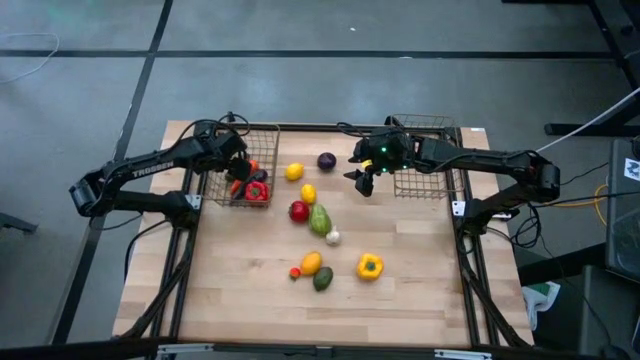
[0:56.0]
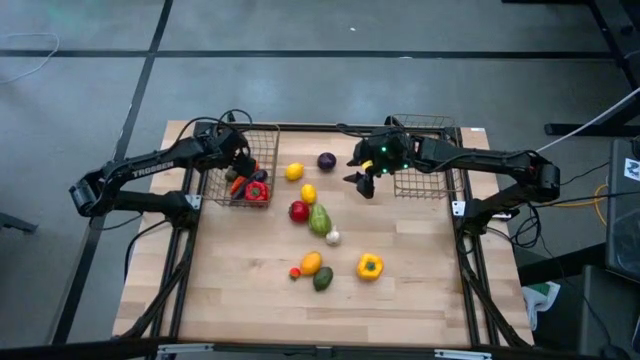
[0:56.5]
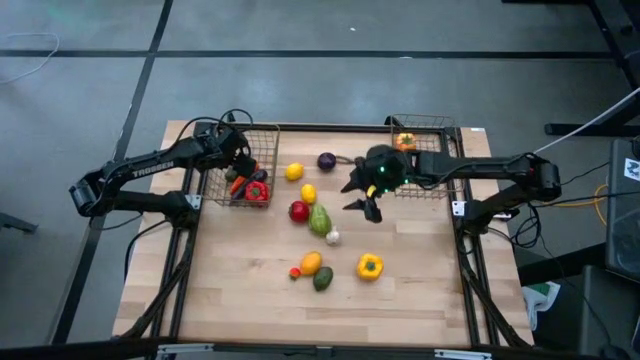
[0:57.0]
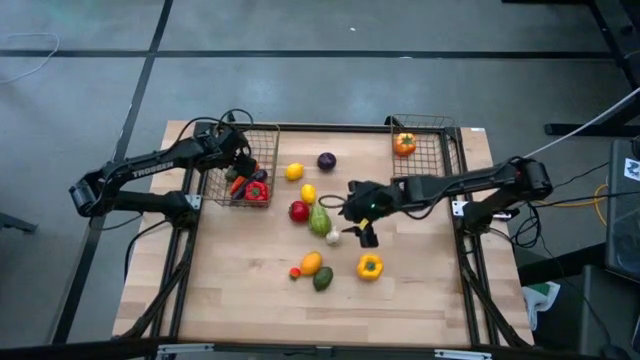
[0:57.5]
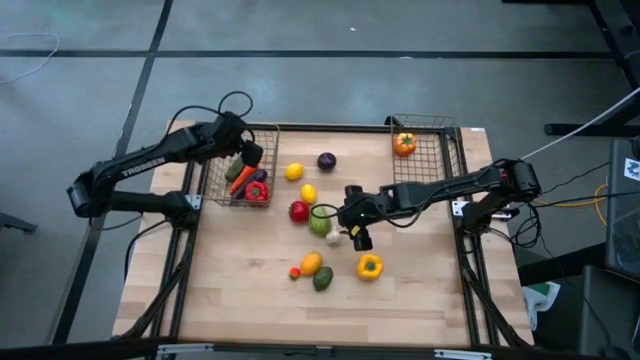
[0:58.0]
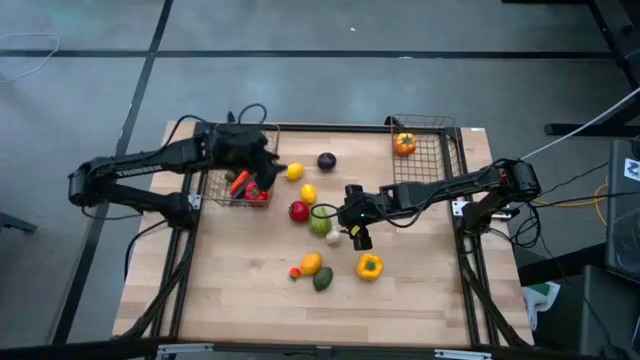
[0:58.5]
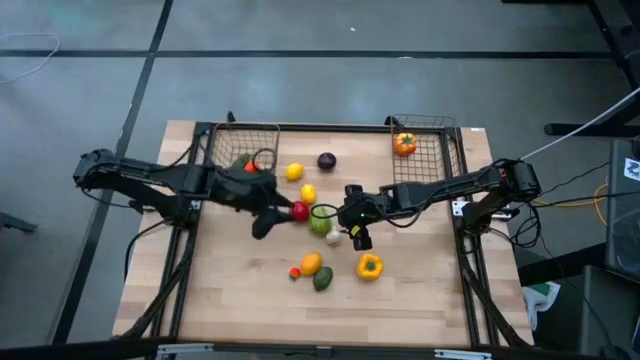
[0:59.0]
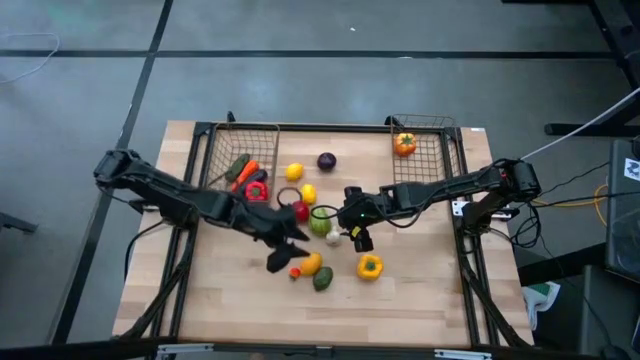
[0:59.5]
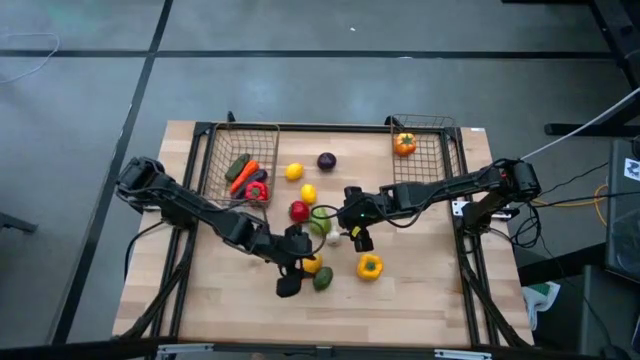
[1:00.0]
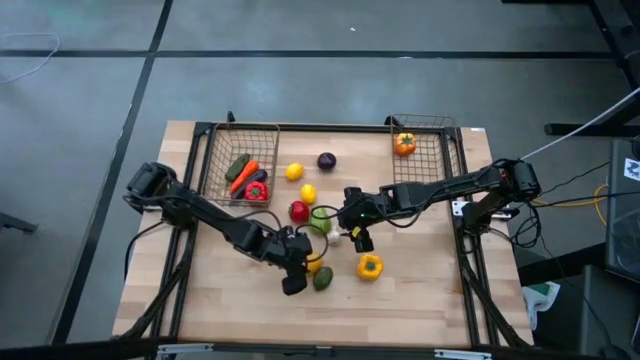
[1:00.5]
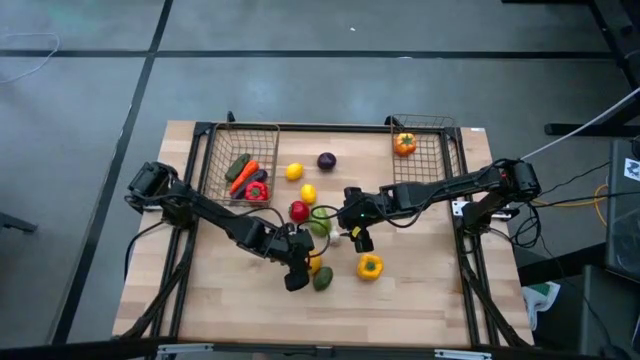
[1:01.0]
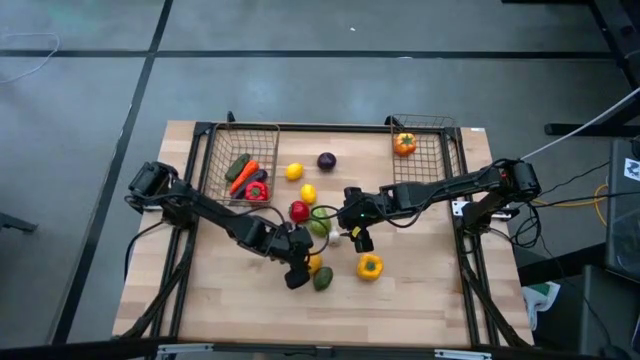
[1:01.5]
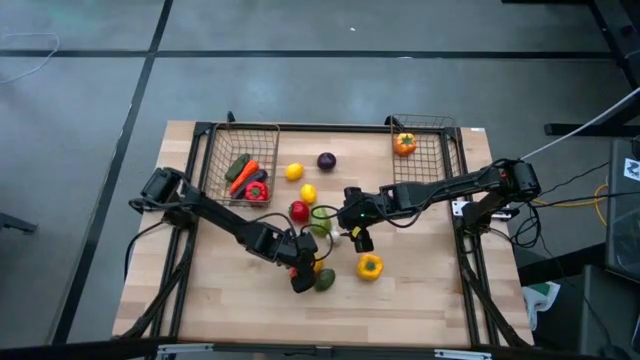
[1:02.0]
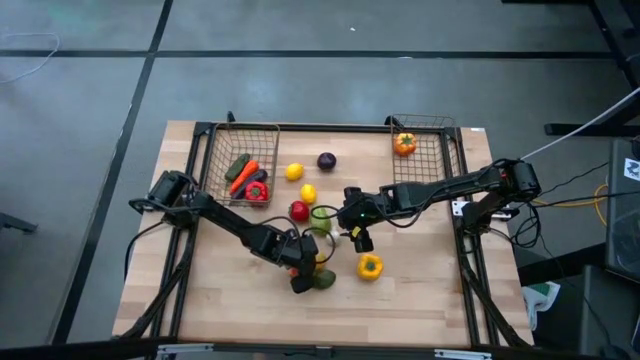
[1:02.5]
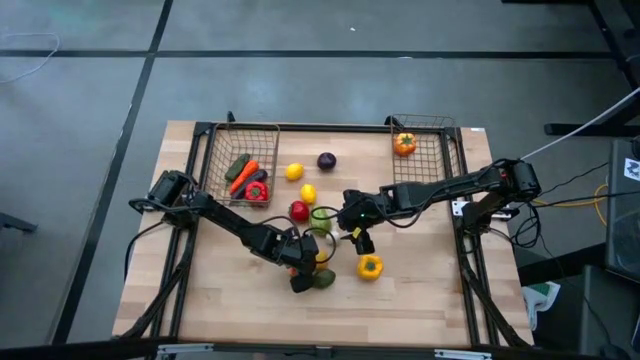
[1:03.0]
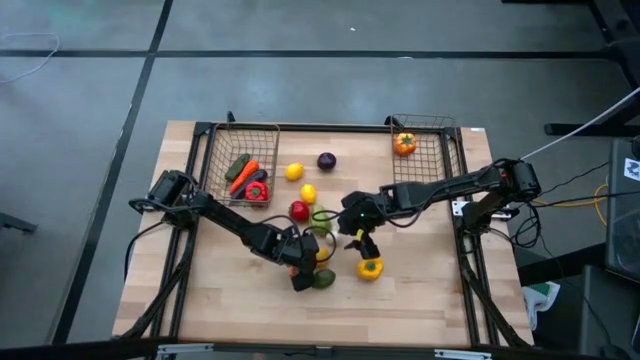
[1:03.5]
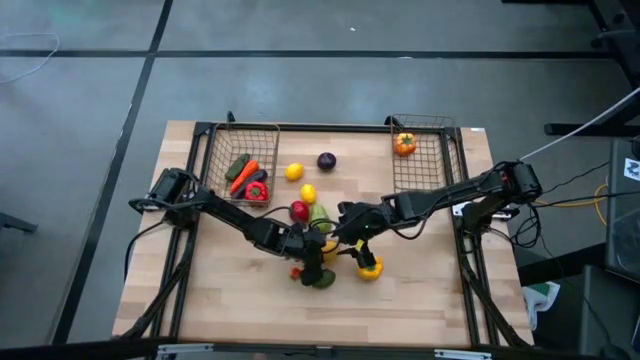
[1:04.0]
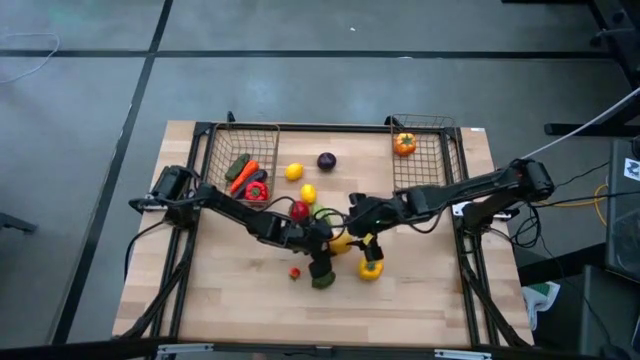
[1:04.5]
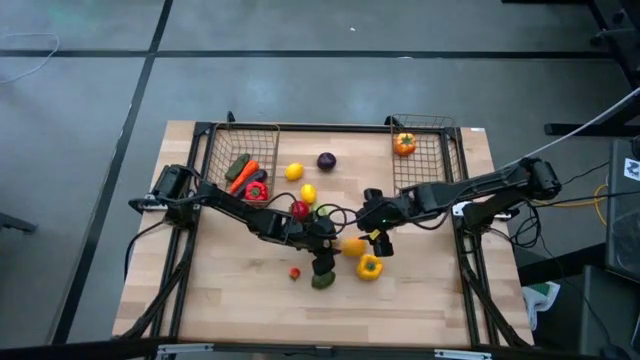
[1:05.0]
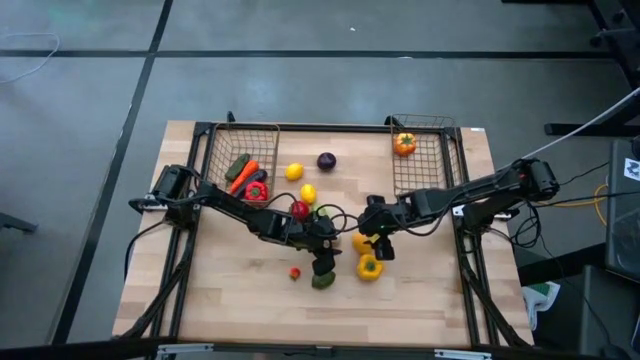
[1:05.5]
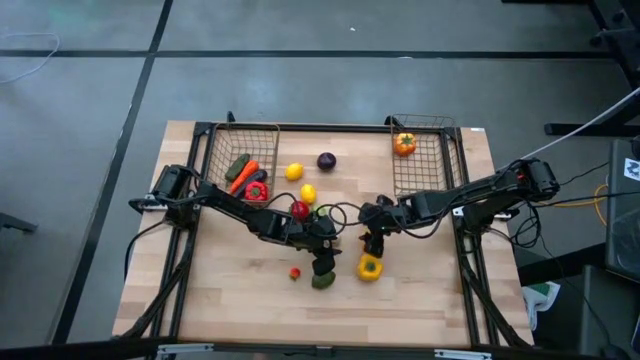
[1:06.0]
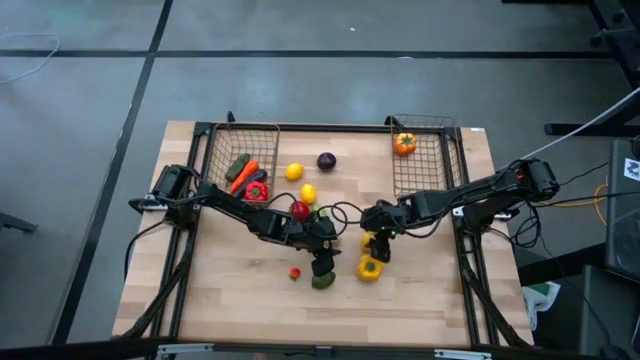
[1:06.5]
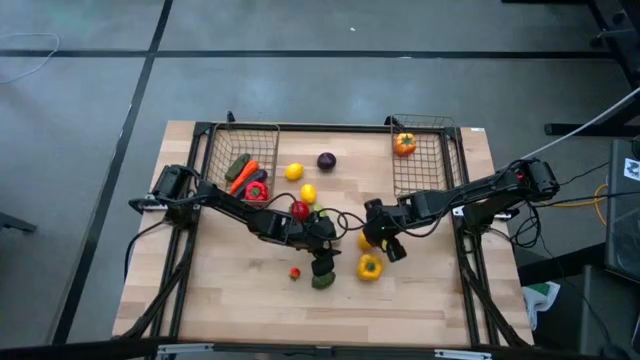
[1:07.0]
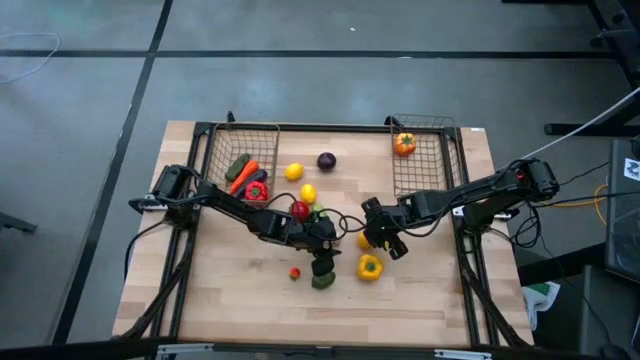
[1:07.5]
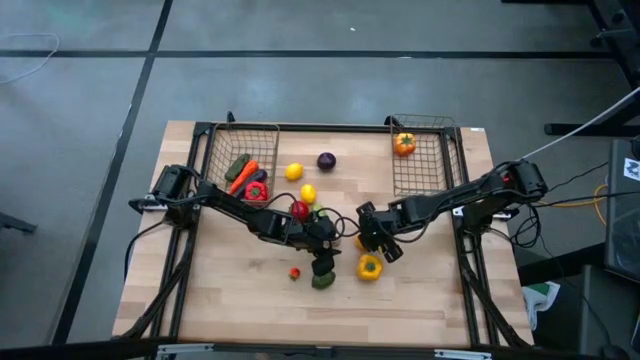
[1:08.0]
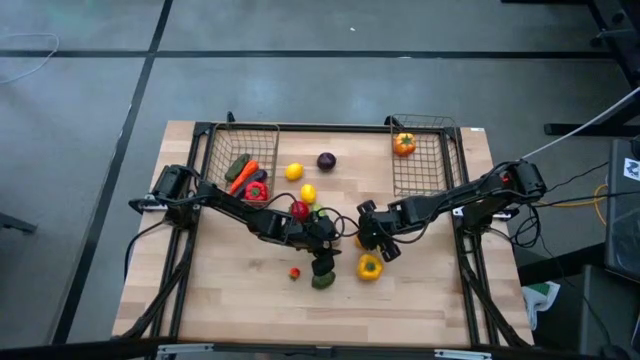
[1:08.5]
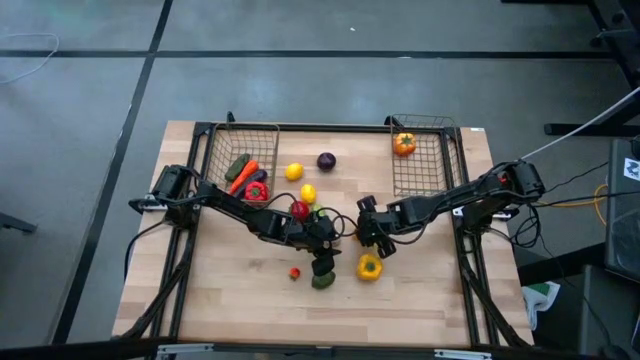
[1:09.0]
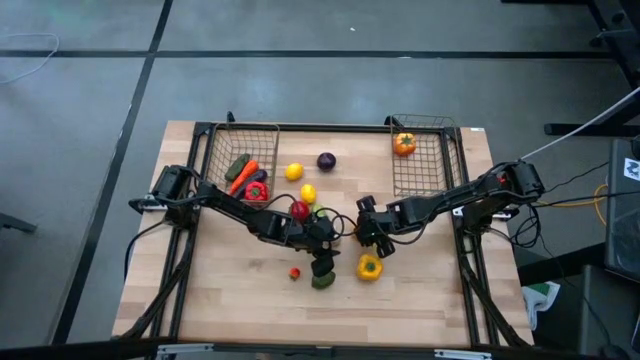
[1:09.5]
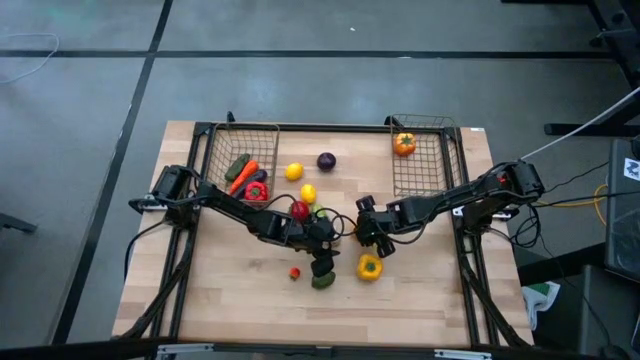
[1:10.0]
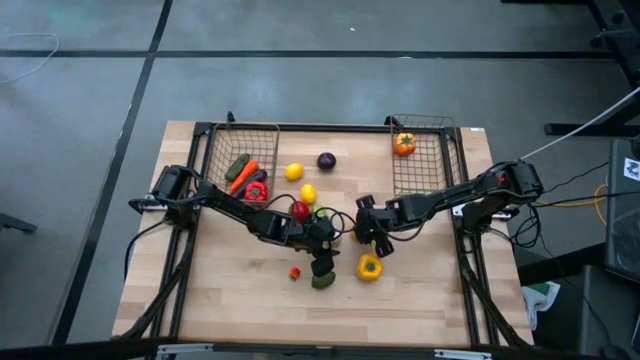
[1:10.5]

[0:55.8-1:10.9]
Task: Sort produce into baskets
Put the bottom lemon into the right gold wire basket

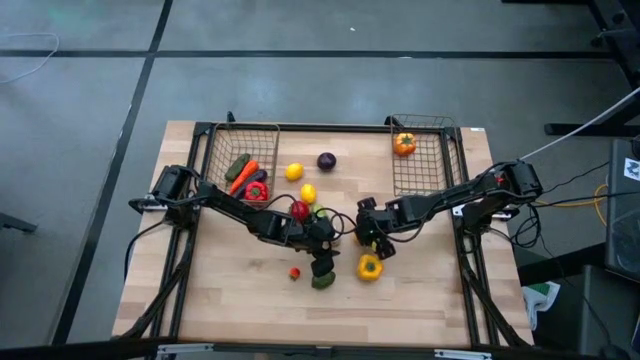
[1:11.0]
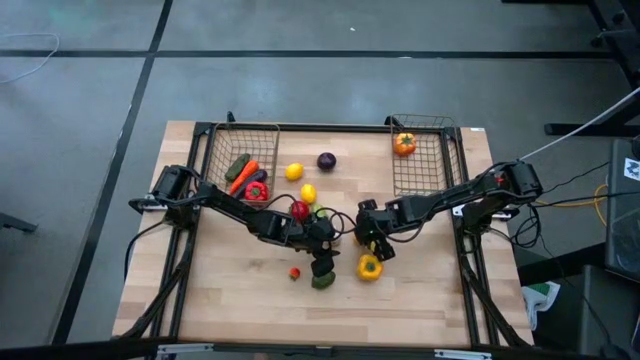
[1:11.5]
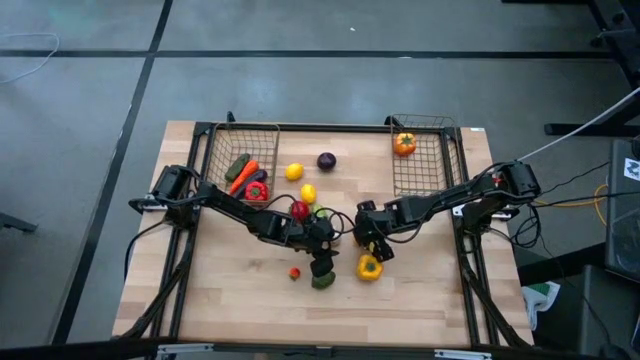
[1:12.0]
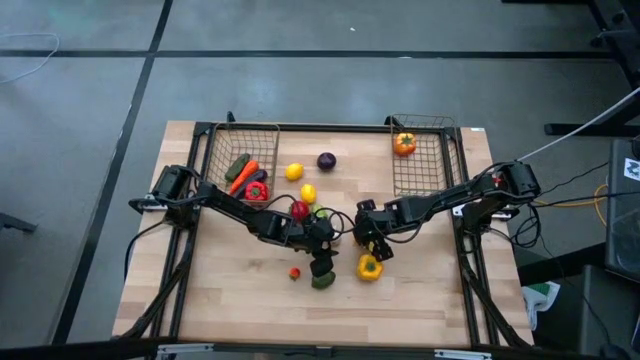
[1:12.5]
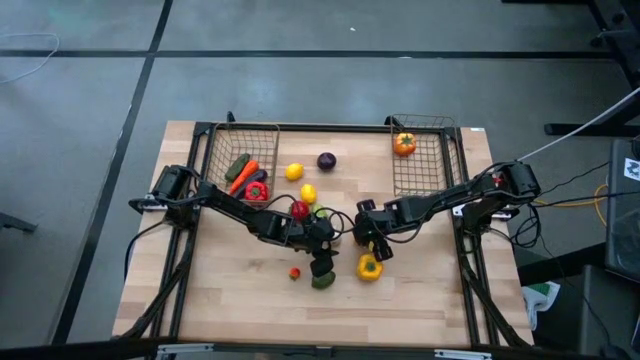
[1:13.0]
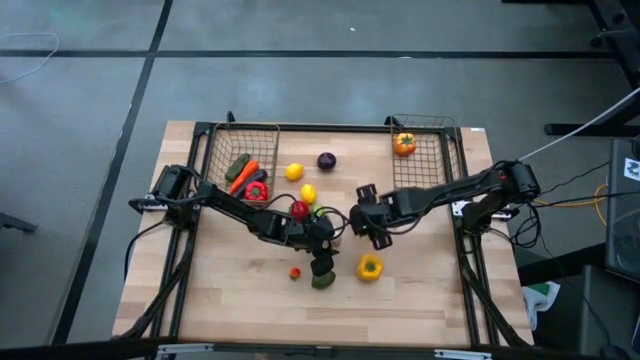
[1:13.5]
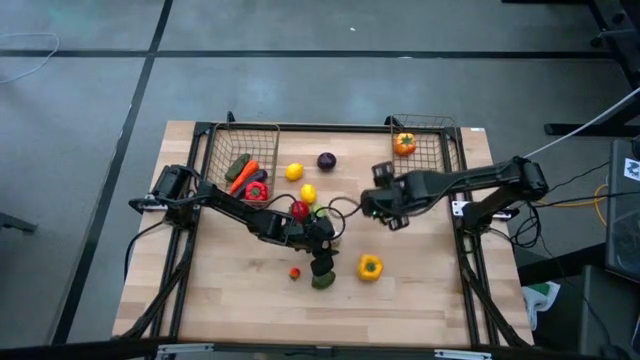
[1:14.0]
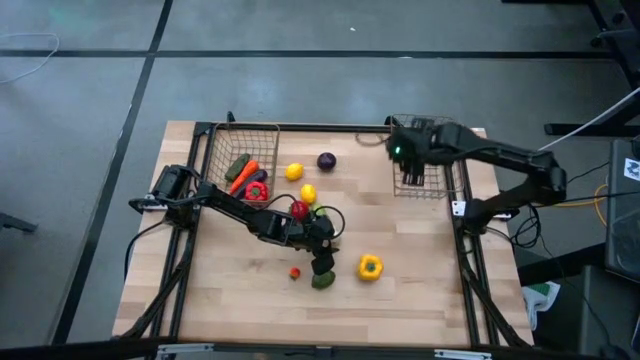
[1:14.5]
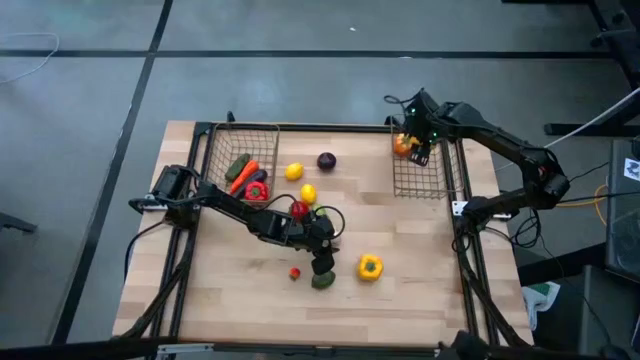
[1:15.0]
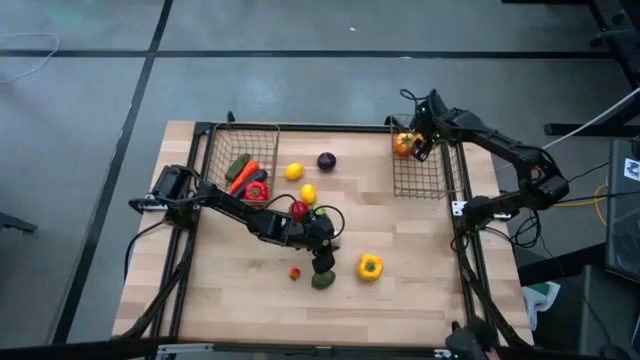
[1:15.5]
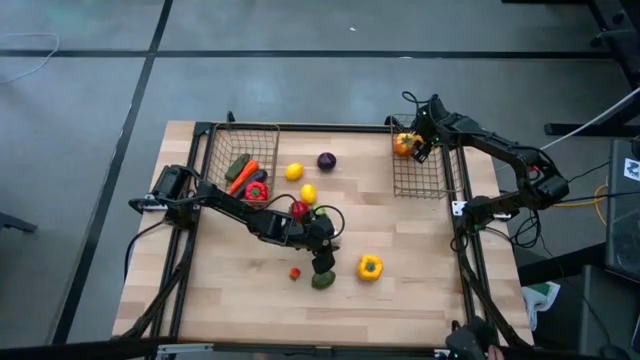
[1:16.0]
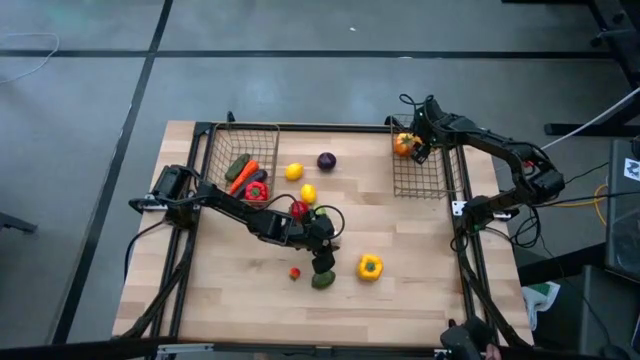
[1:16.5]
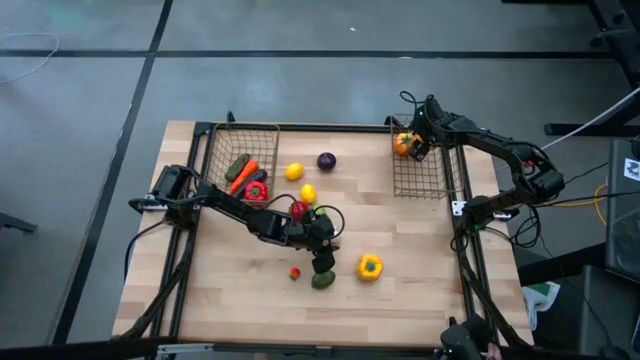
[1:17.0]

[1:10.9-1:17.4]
Put the bottom lemon into the right gold wire basket
